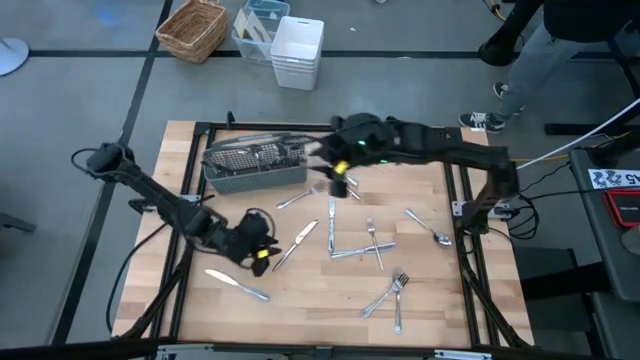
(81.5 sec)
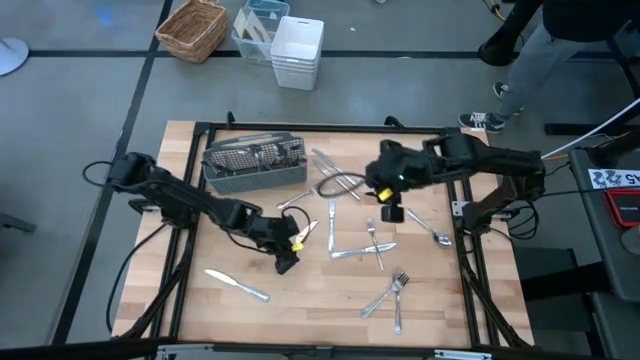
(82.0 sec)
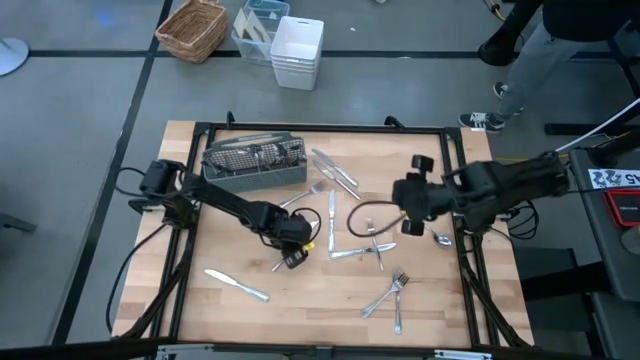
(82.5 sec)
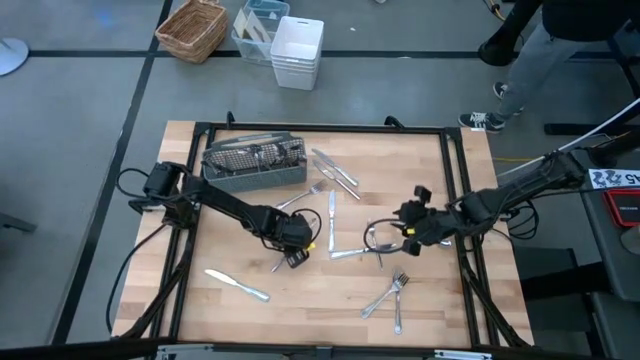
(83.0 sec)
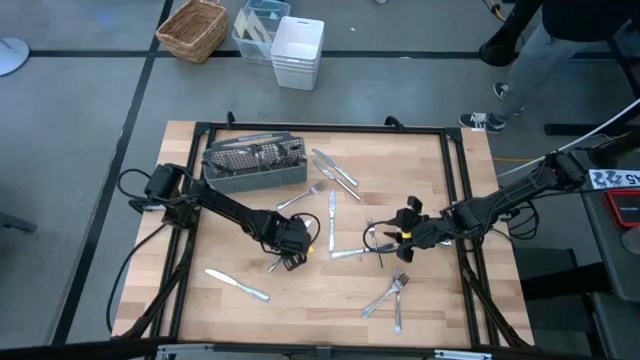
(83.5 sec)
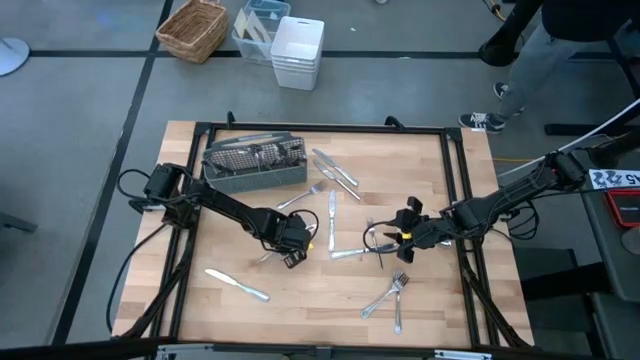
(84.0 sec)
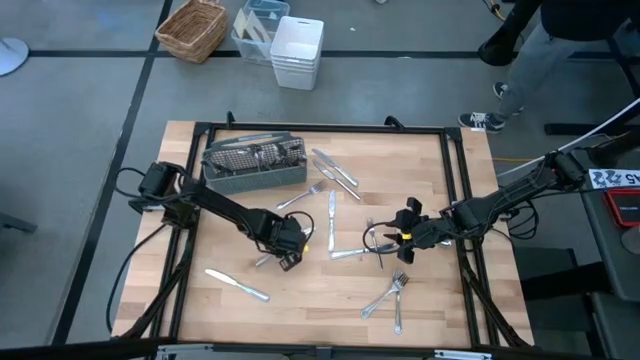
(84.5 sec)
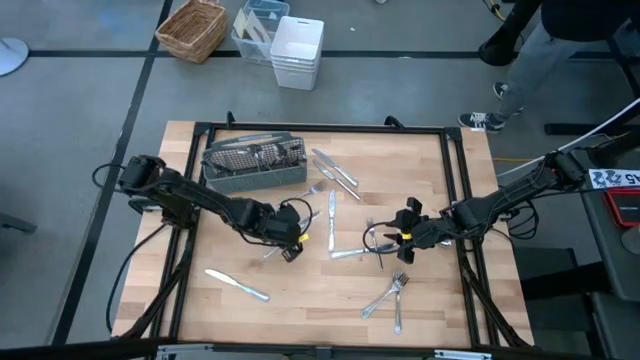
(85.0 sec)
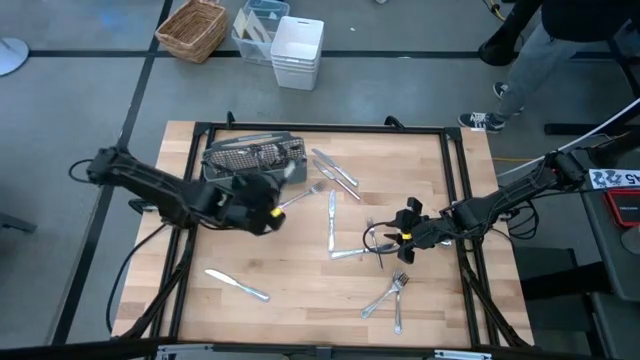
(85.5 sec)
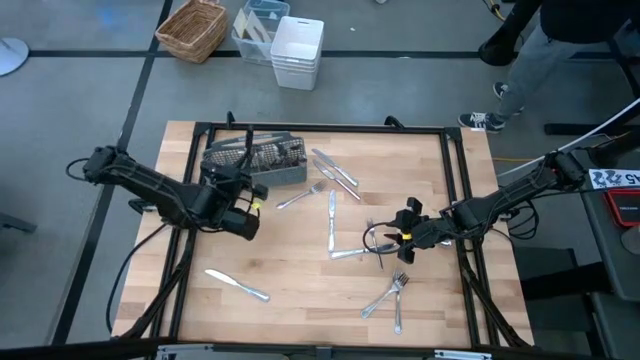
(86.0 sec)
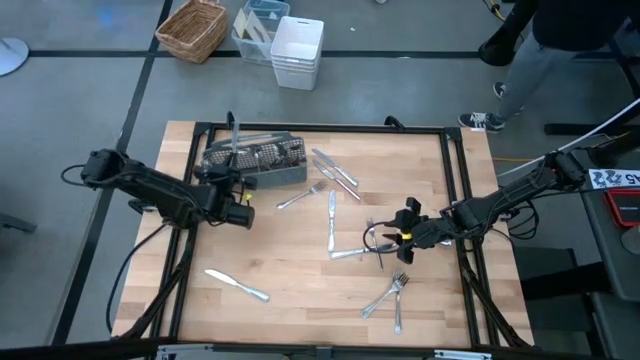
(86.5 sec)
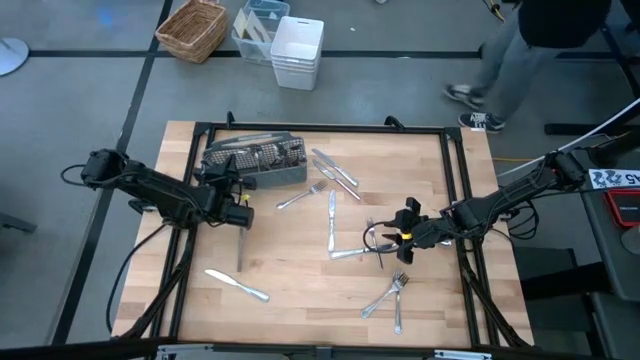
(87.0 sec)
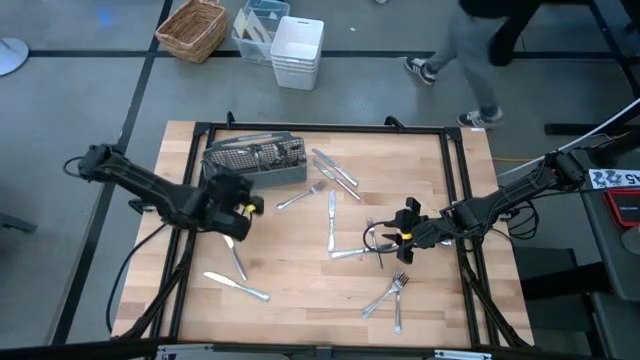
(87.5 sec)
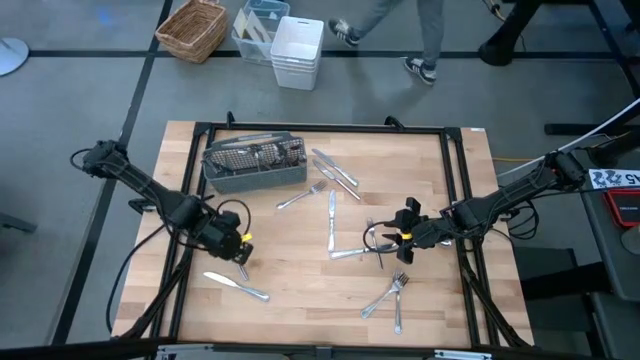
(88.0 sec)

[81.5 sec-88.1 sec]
Task: Sort silverware
Put the silver table knife into the silverware rack

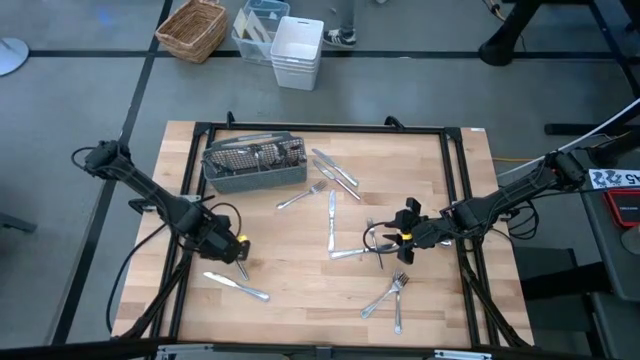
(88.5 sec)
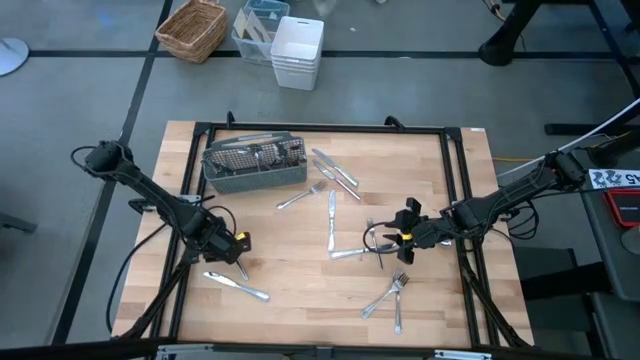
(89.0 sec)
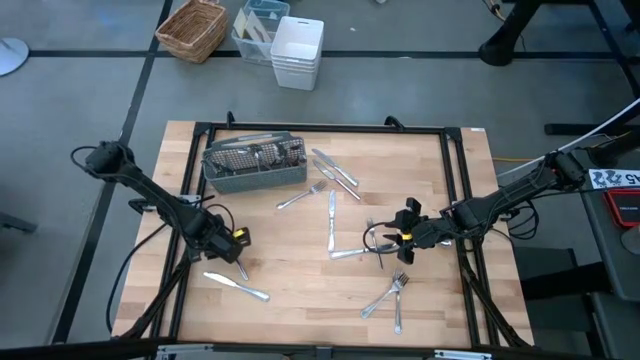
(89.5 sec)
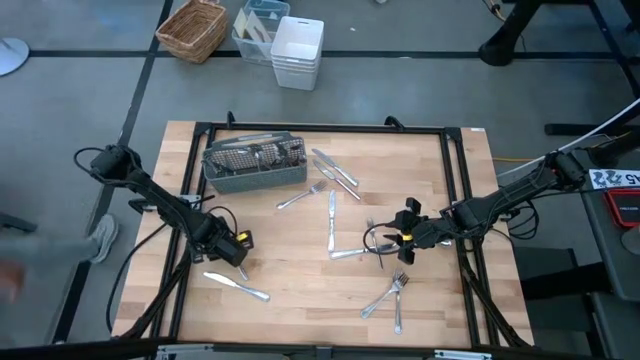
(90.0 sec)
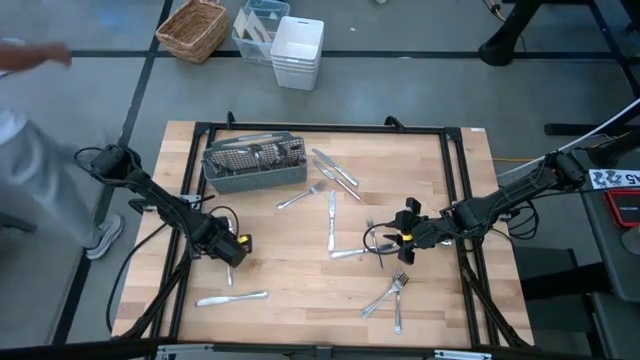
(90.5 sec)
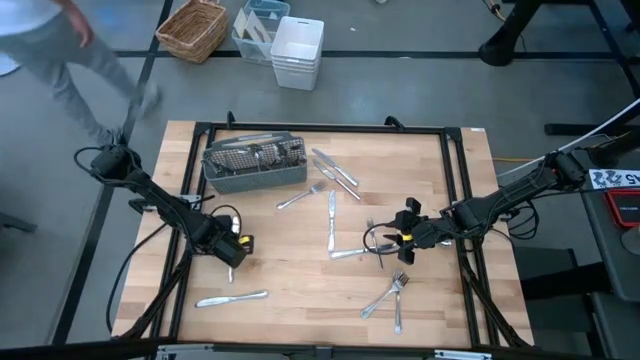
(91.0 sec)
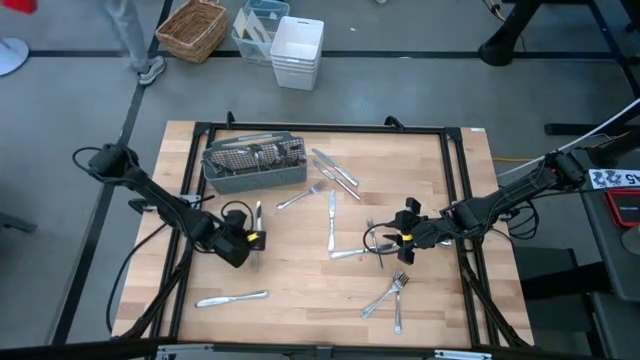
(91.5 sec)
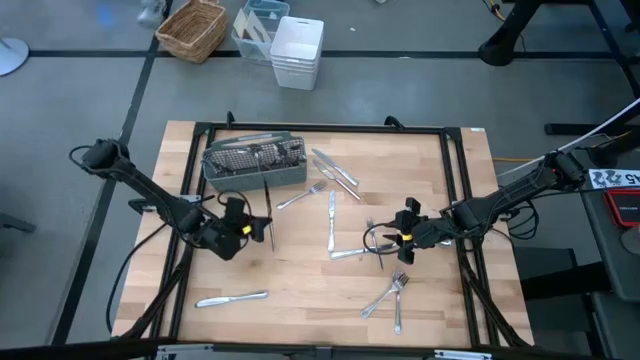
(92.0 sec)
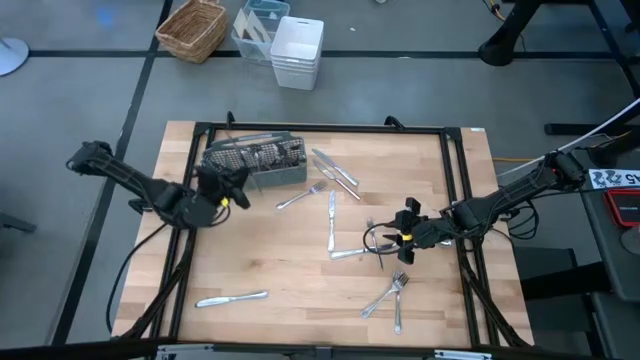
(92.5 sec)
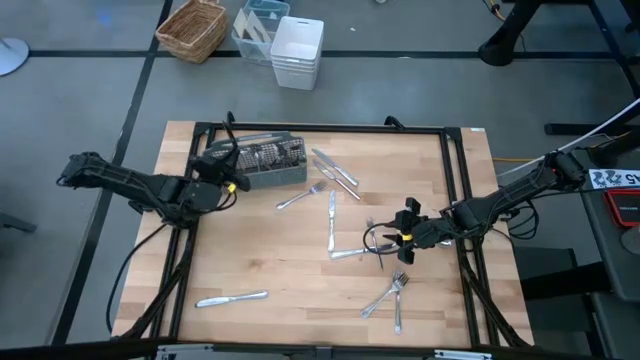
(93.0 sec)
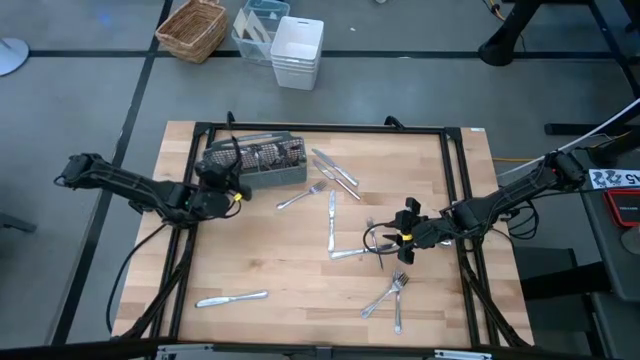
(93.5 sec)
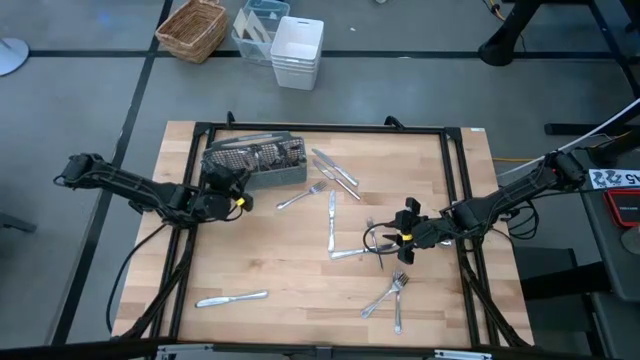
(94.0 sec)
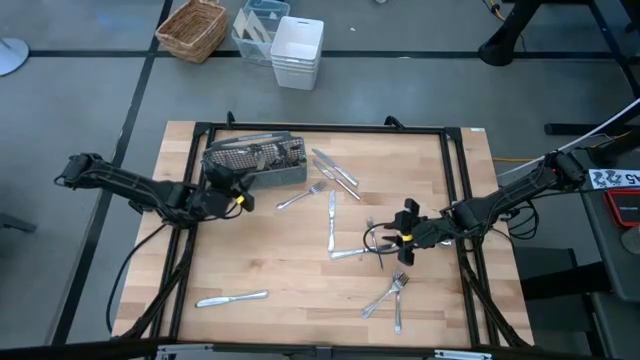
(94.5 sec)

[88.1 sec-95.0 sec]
Put the silver table knife into the silverware rack

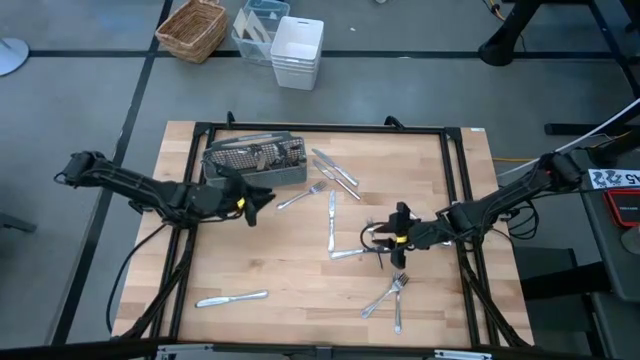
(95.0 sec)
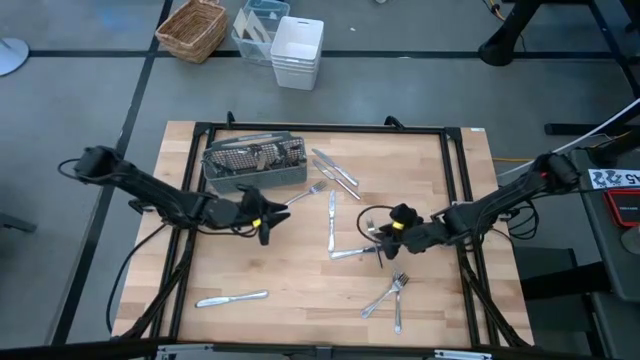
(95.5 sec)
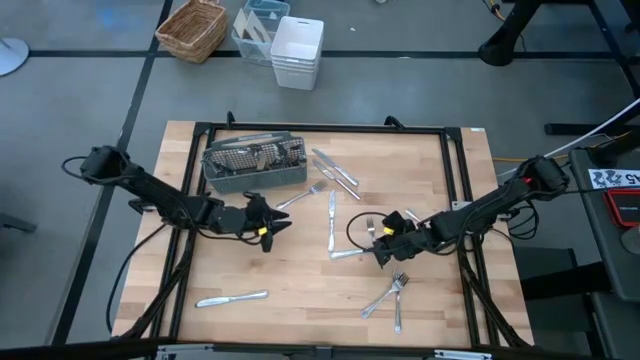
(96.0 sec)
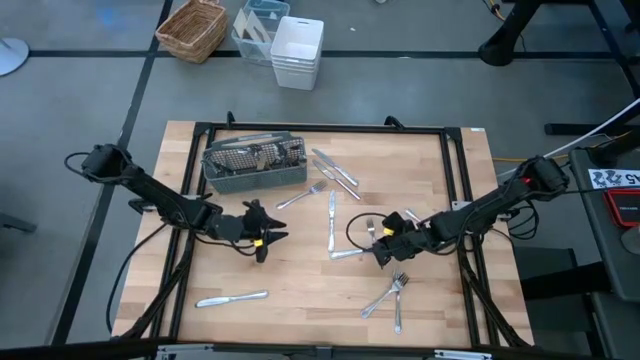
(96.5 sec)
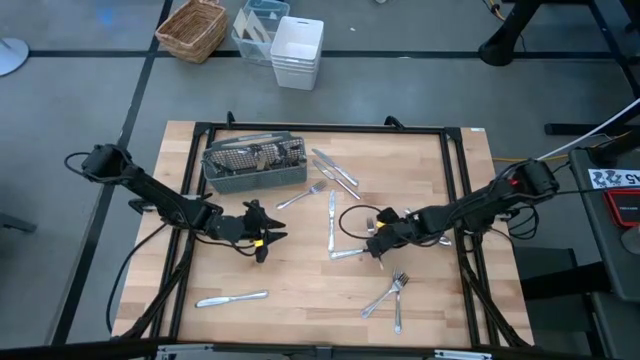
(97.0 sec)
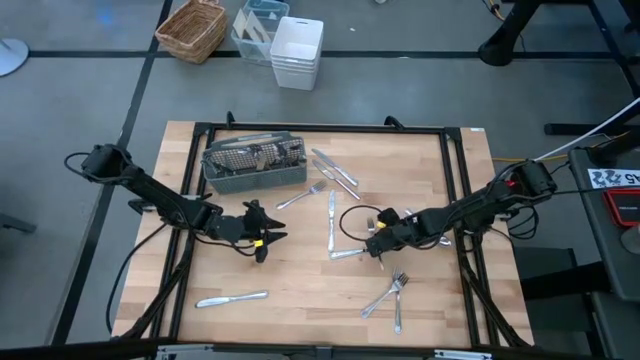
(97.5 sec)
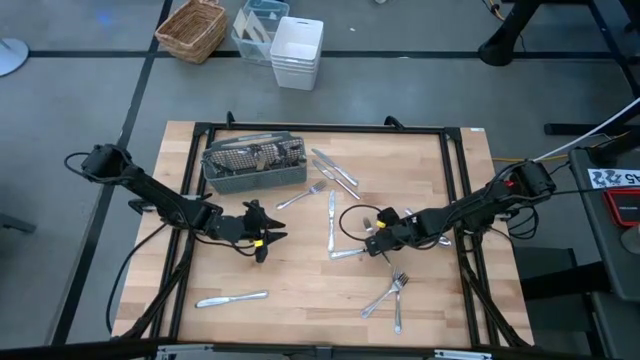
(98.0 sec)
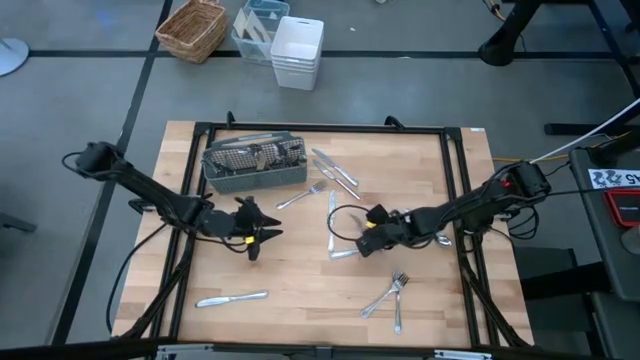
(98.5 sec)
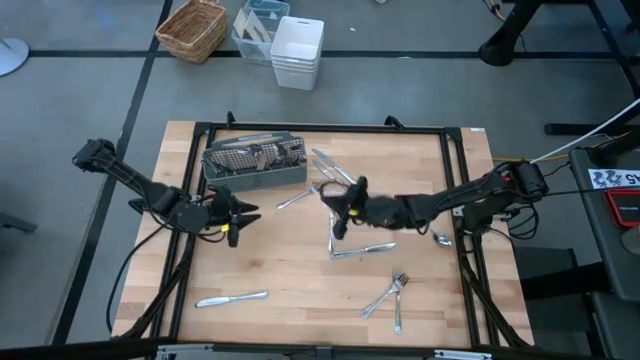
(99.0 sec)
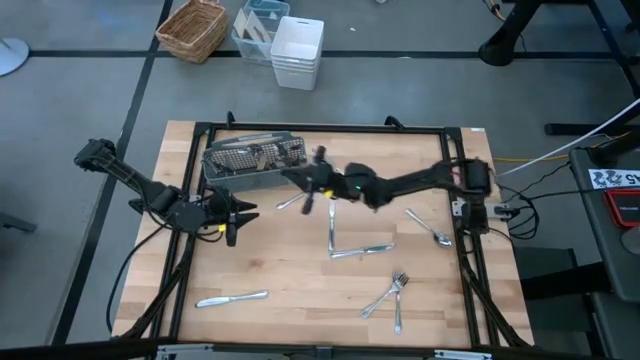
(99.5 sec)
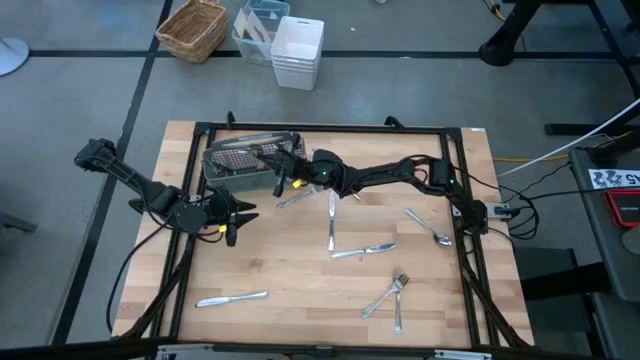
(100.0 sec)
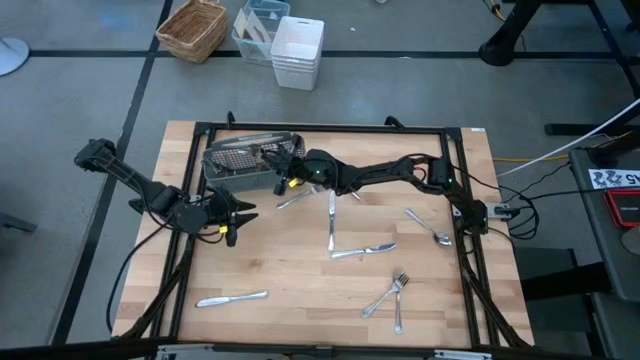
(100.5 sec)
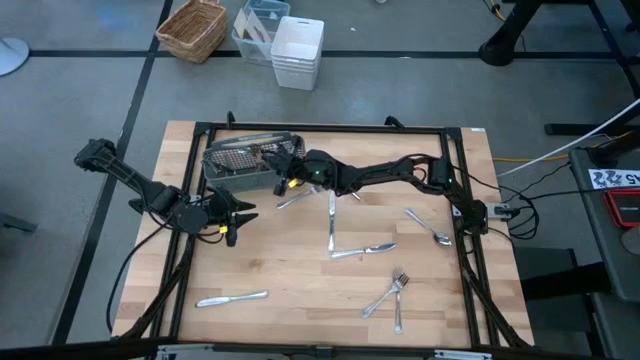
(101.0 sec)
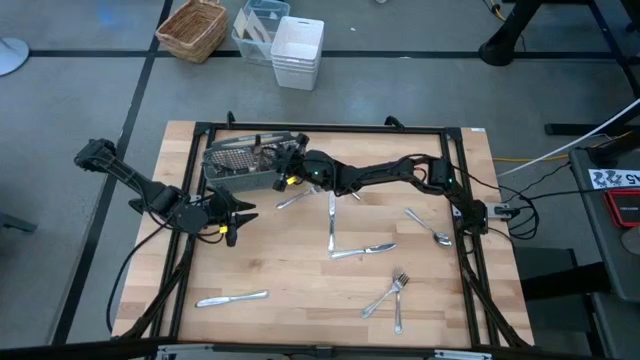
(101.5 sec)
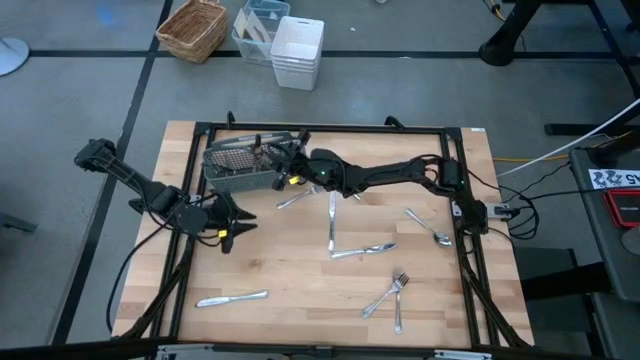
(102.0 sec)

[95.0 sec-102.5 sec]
Put the silver fork into the silverware rack

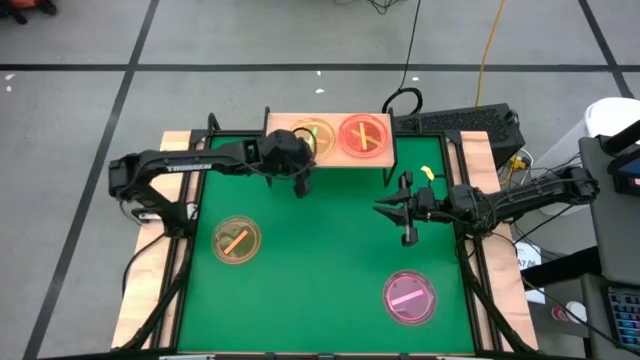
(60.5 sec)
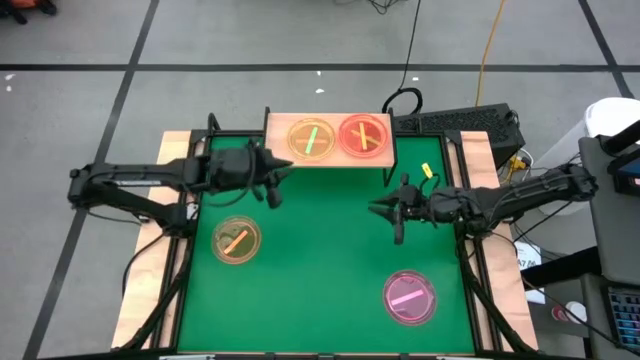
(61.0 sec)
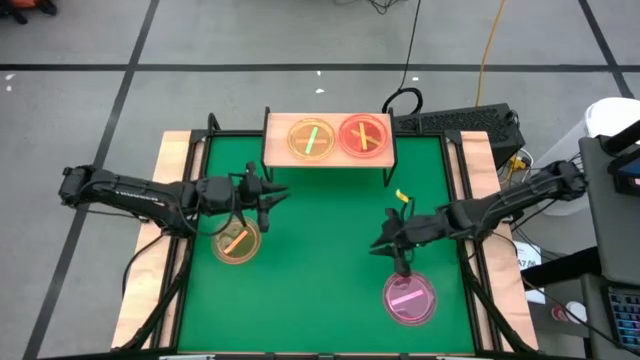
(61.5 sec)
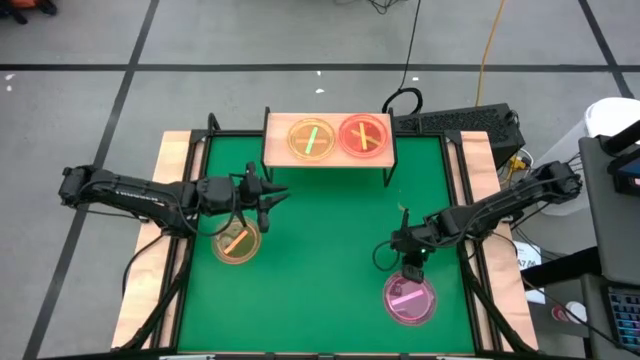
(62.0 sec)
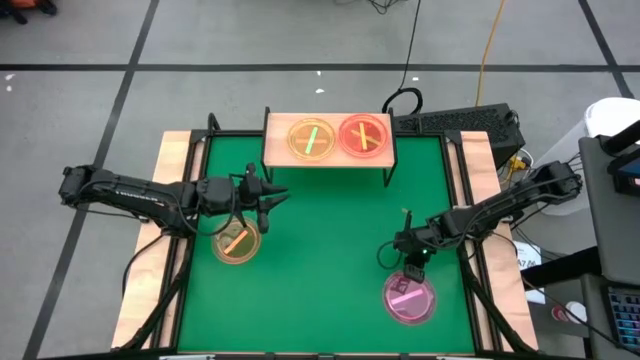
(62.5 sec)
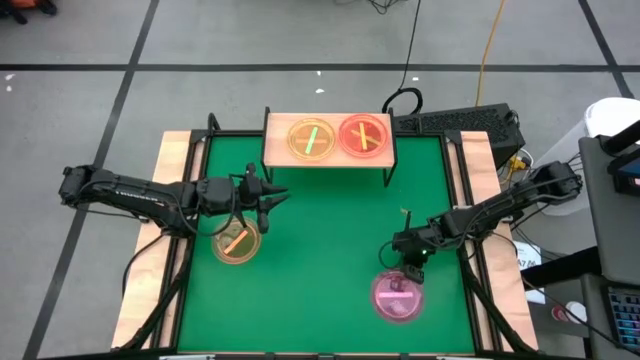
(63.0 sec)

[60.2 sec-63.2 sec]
Task: Place and stack plates onto a shelf
Stack the pink plate on top of the green plate on the shelf
